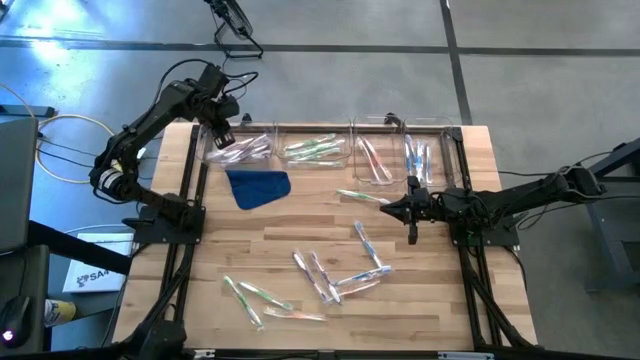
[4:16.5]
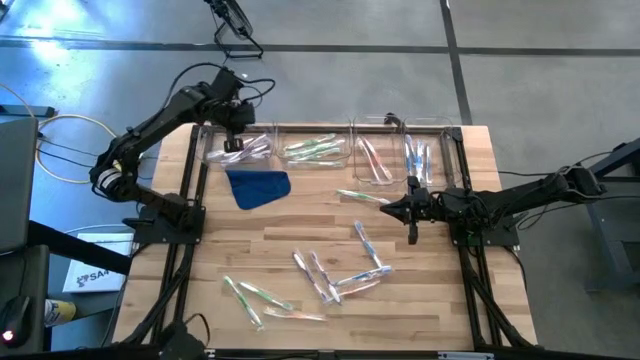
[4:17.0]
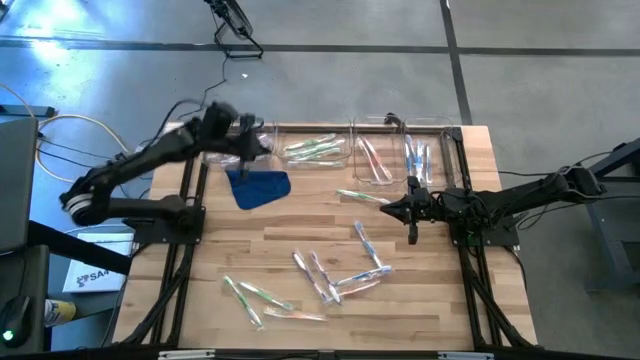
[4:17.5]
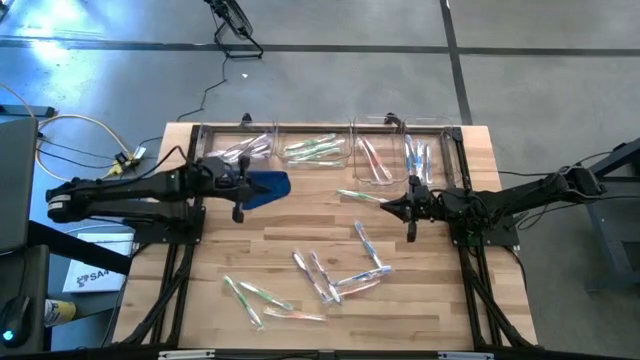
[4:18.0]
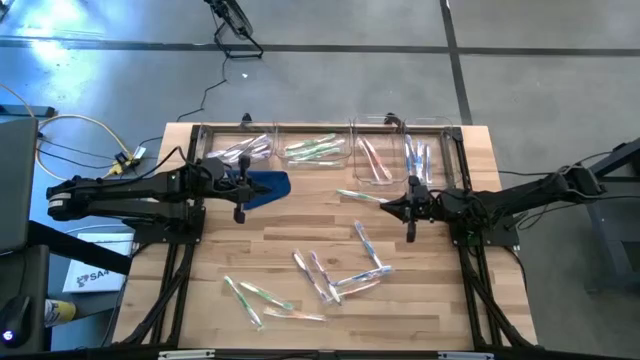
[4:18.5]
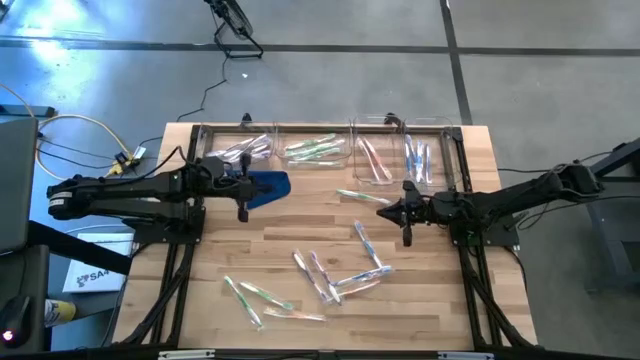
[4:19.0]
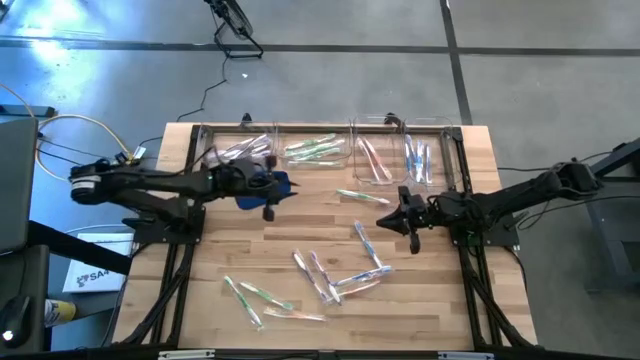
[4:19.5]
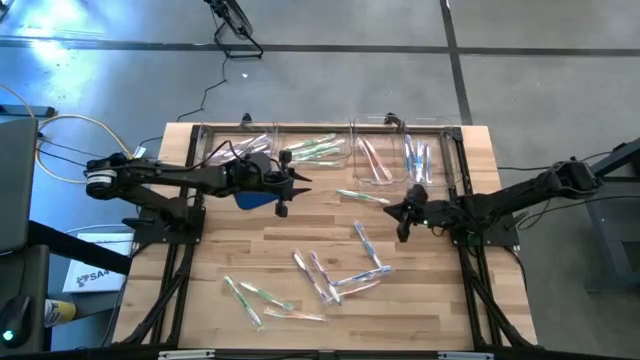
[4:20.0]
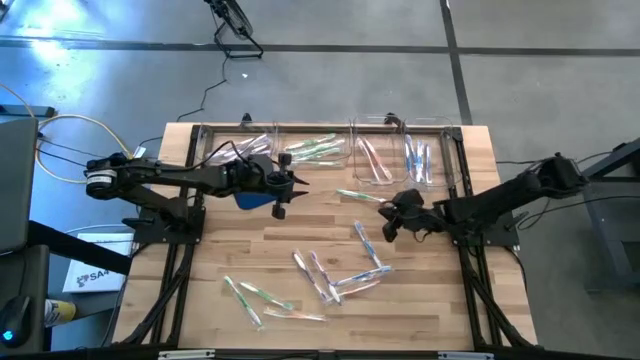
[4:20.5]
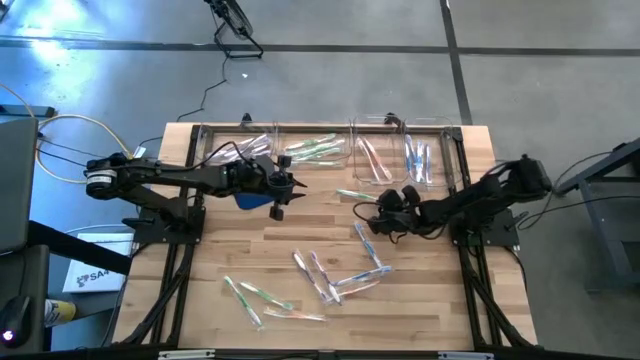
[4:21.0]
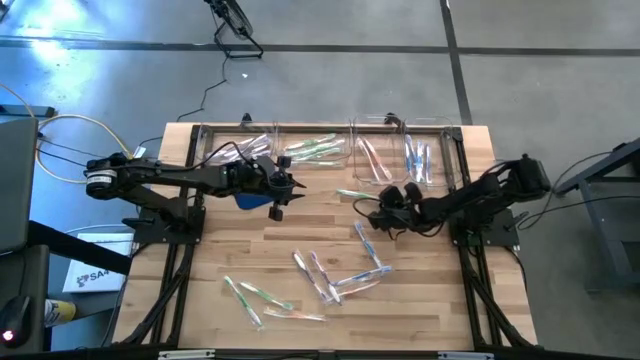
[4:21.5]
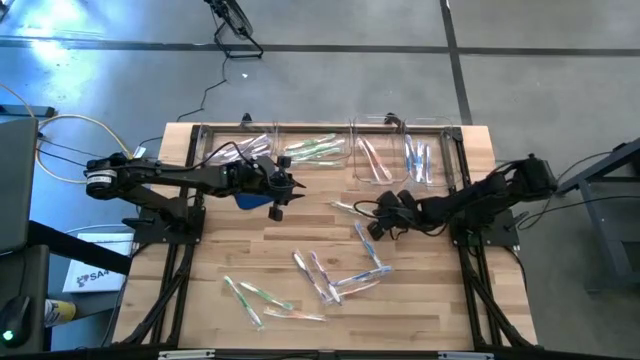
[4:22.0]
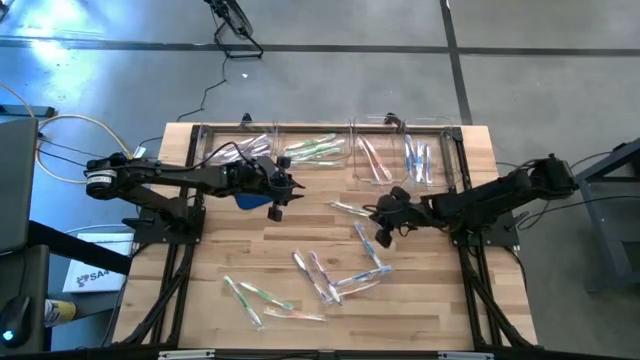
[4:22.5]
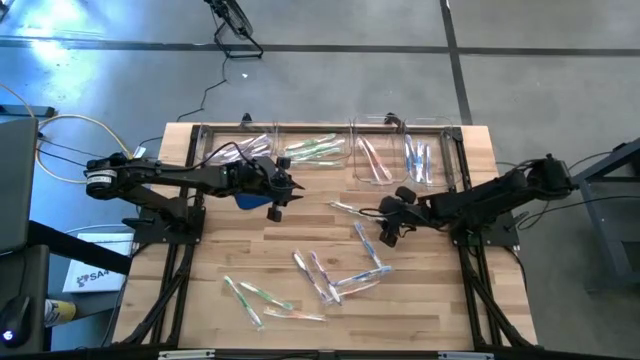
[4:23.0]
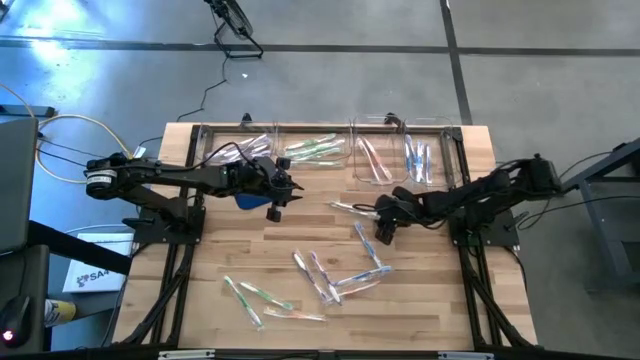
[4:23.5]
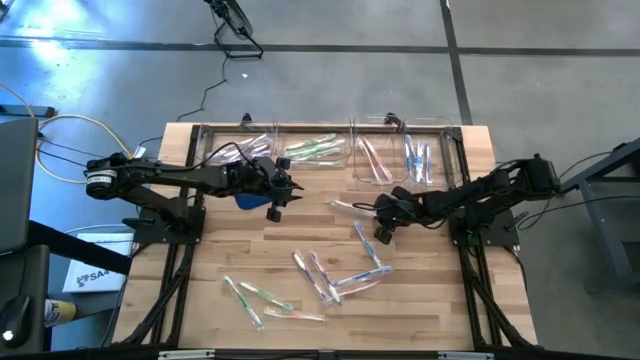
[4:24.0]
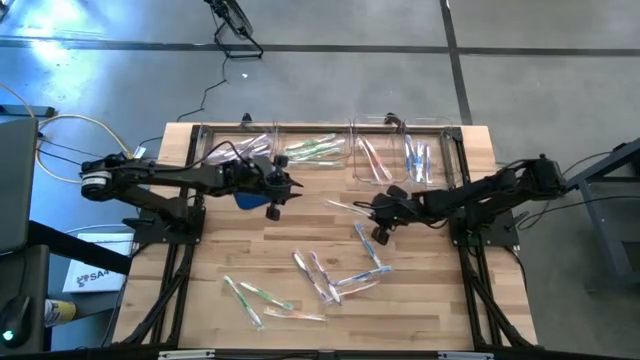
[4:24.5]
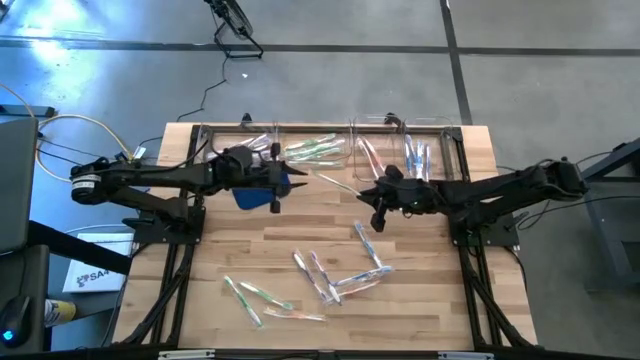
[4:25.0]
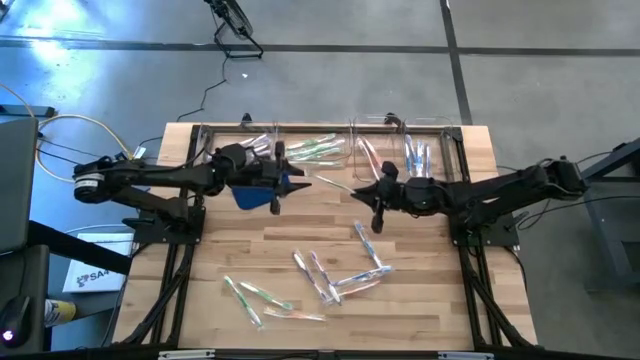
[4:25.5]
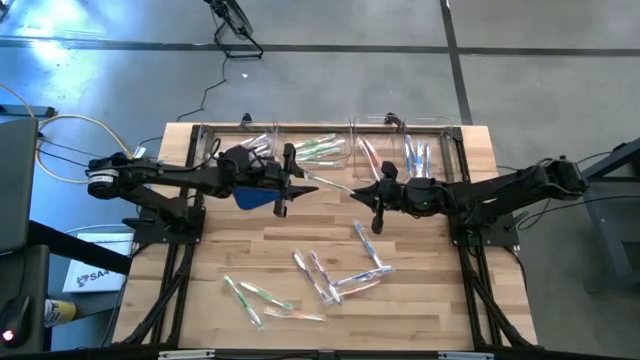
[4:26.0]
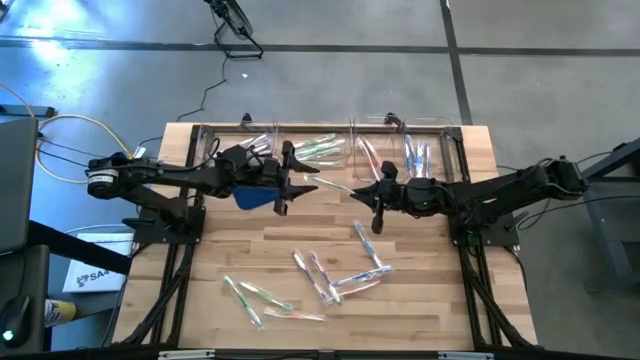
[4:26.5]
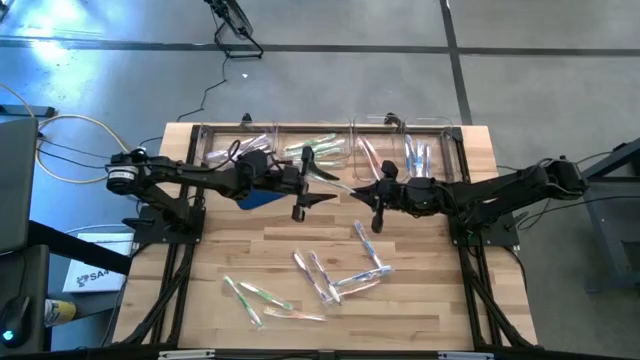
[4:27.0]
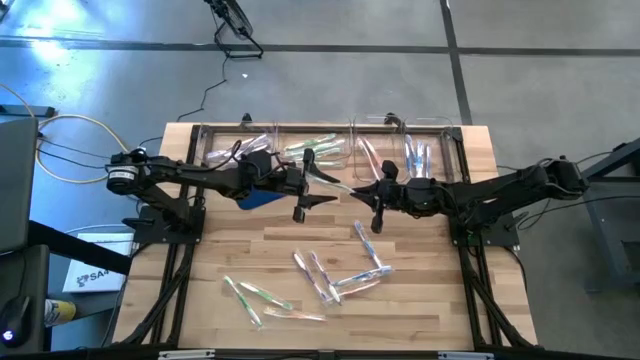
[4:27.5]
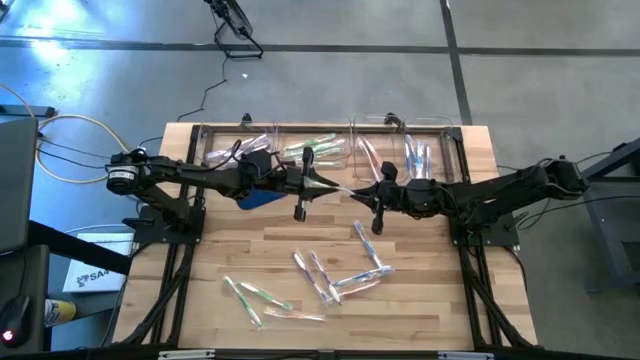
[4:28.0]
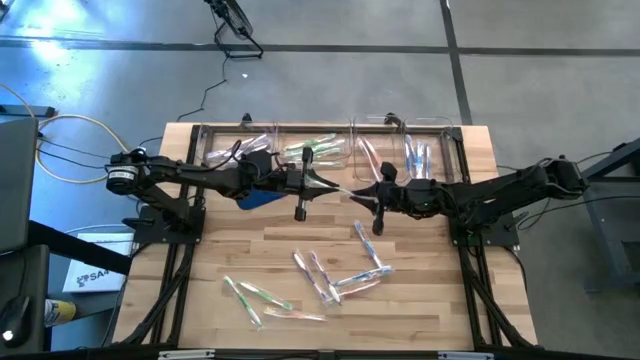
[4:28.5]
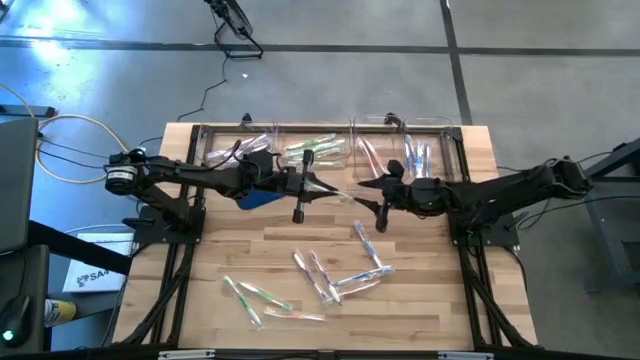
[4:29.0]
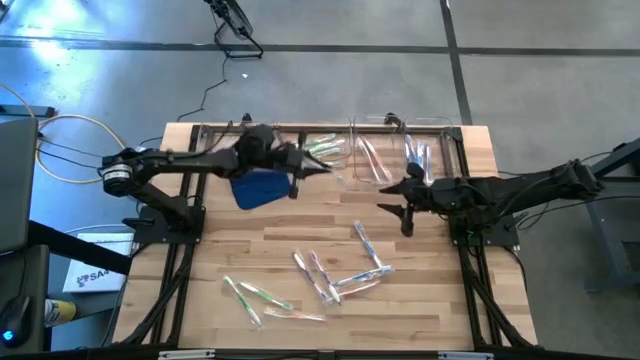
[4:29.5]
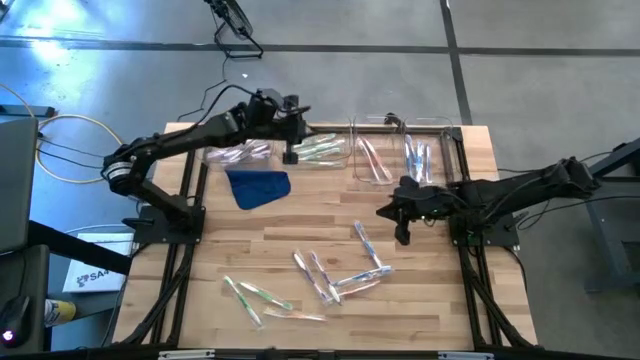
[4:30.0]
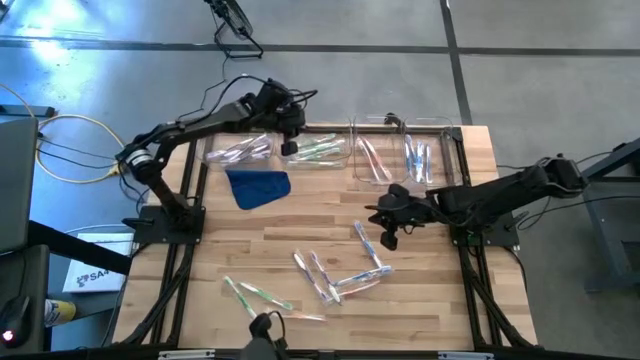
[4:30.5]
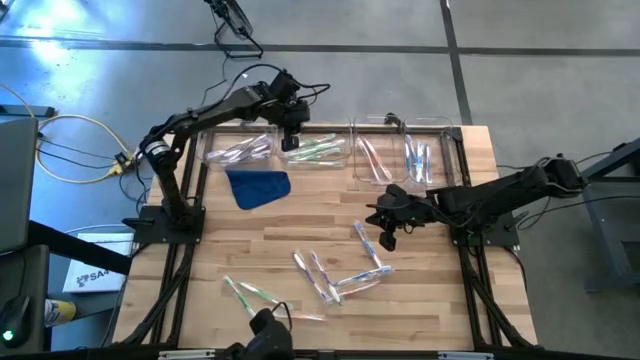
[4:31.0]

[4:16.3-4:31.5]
Task: Pick & Place Toothbrushes
Put the green toothbrush into the middle left transparent bin

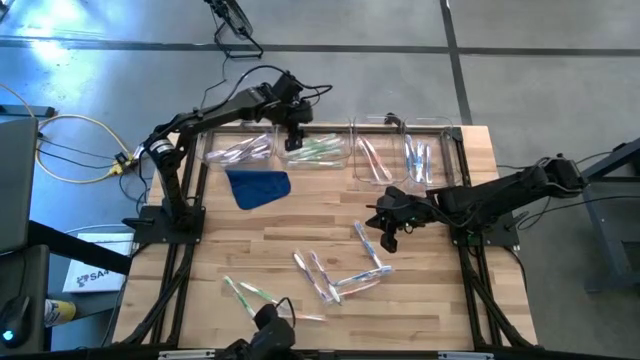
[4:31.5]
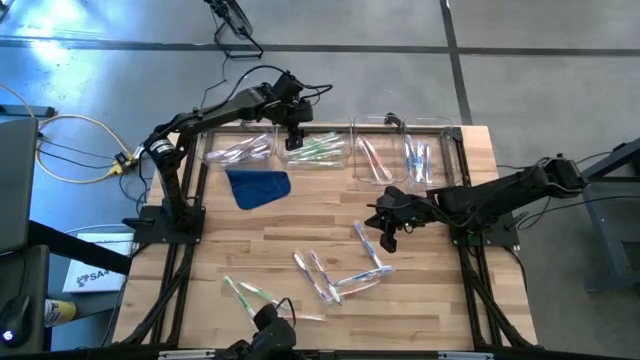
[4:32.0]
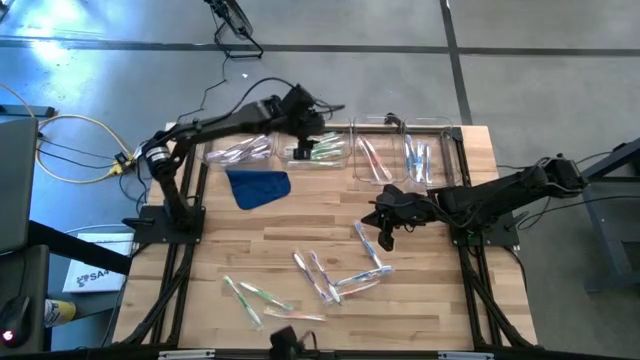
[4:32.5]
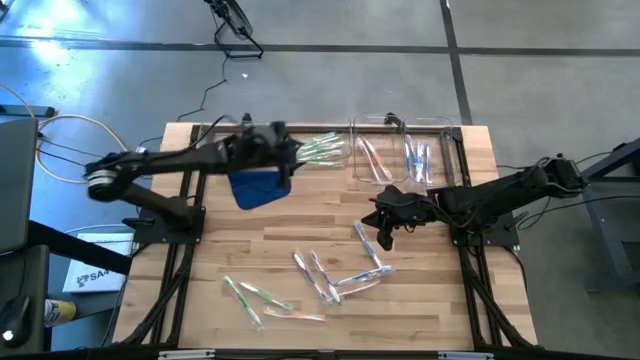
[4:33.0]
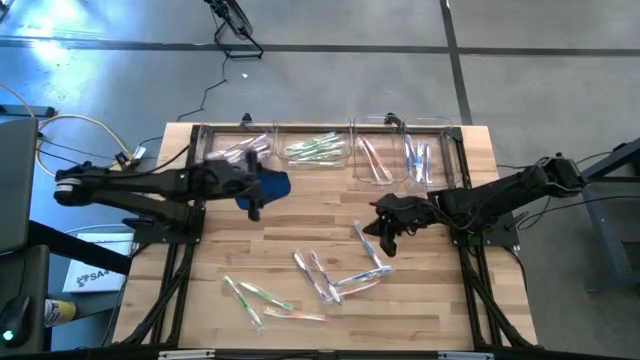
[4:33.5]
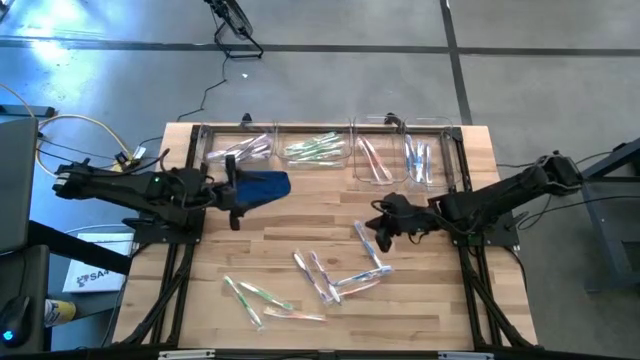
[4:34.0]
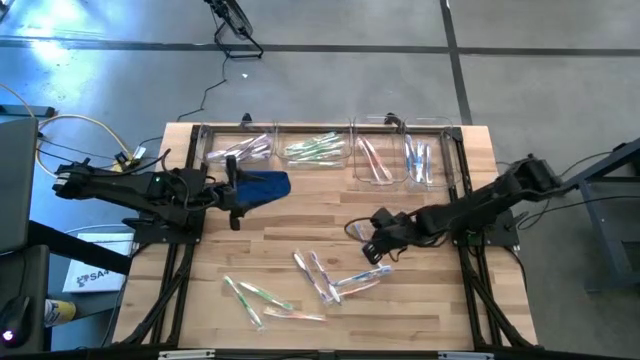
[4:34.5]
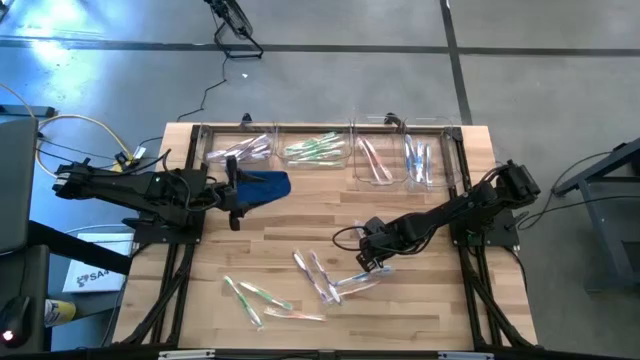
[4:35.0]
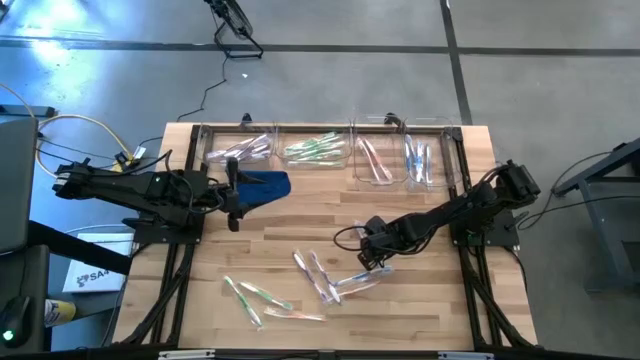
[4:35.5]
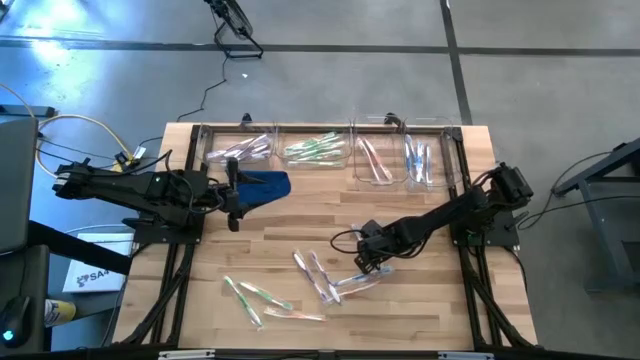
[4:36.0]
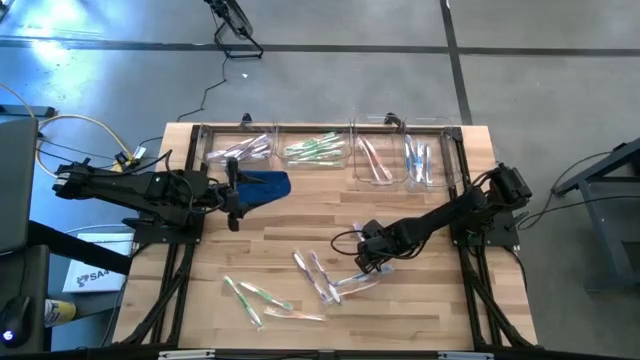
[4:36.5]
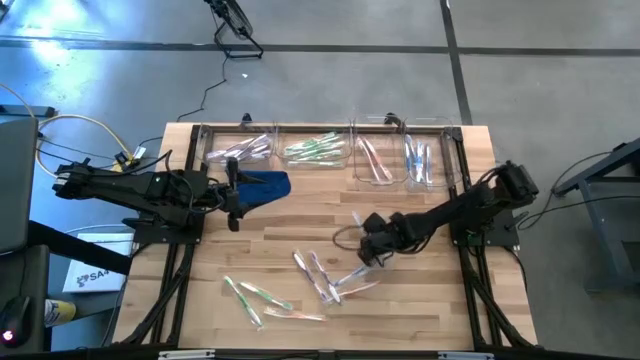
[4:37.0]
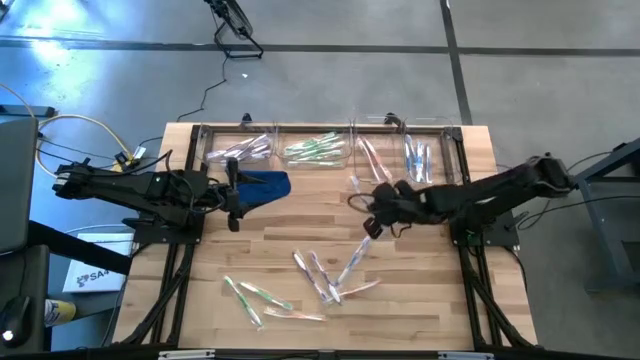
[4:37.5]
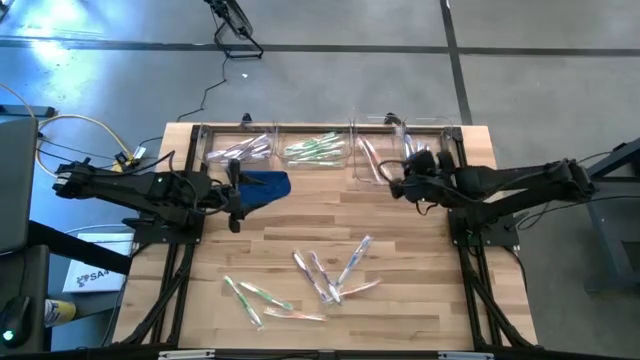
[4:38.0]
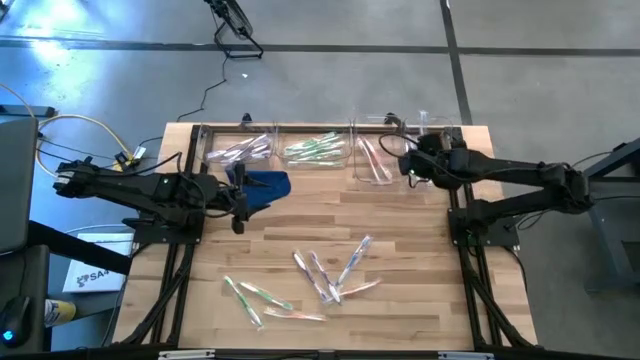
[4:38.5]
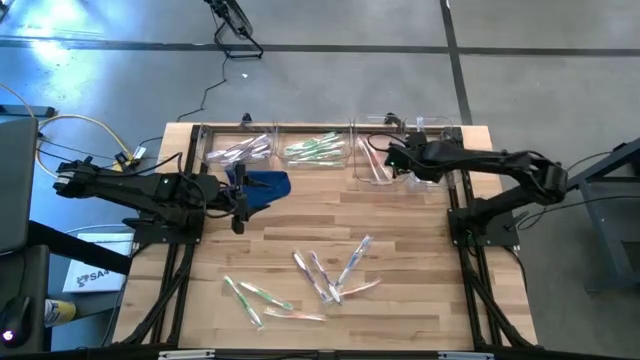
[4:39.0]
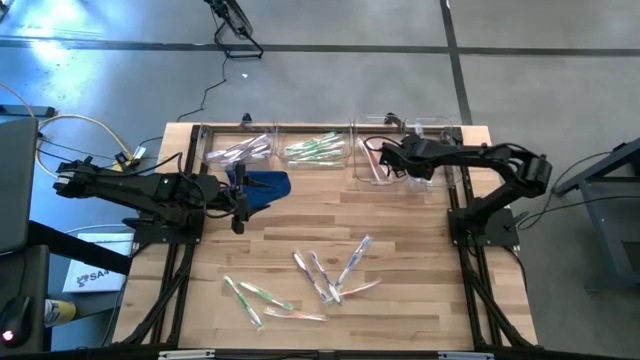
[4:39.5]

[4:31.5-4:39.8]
Put the blue toothbrush into the right transparent bin
